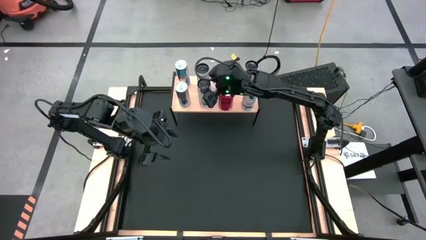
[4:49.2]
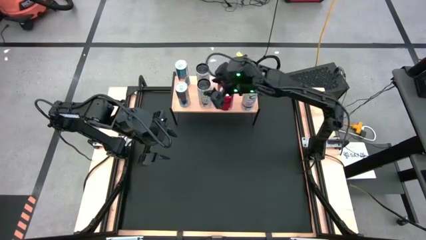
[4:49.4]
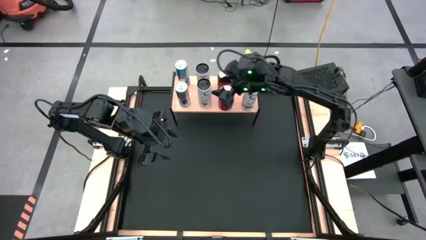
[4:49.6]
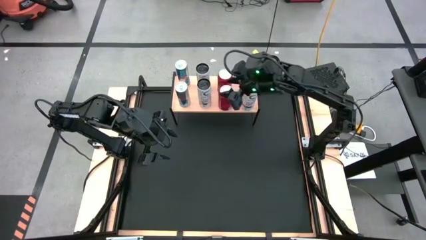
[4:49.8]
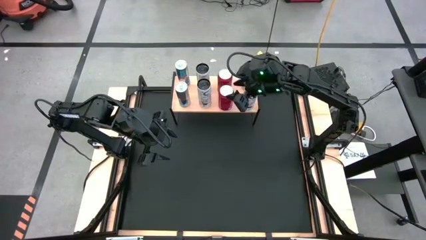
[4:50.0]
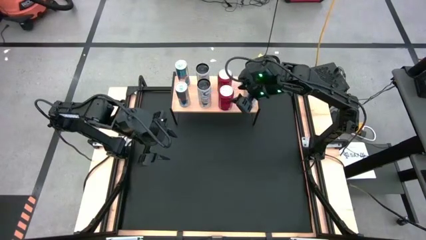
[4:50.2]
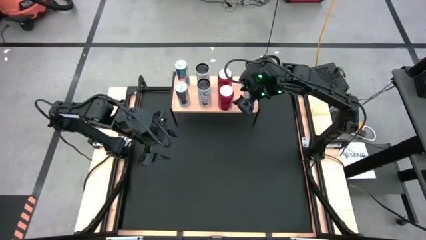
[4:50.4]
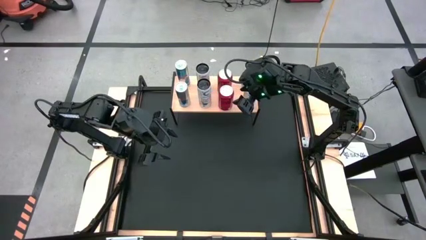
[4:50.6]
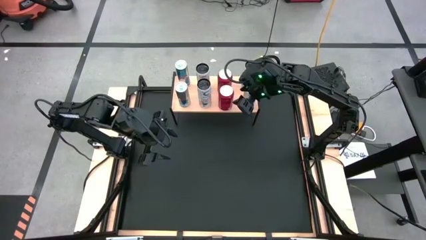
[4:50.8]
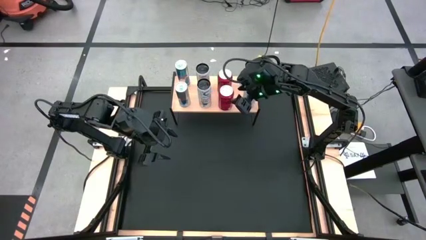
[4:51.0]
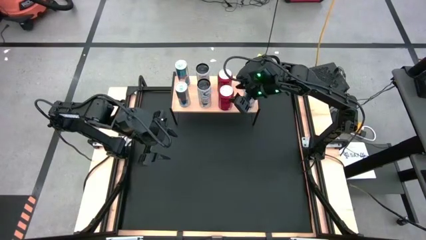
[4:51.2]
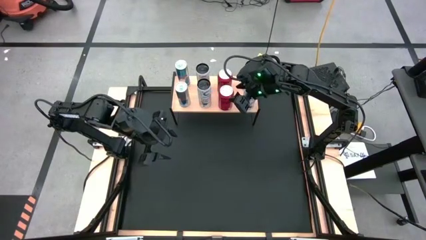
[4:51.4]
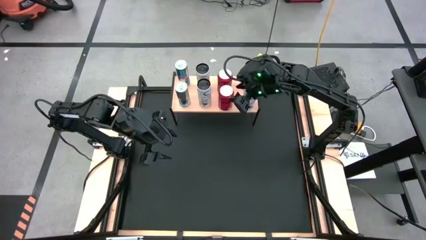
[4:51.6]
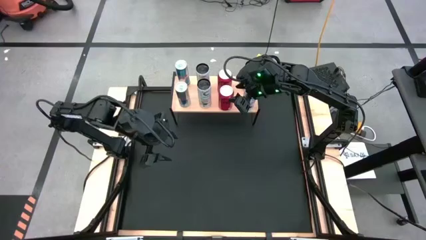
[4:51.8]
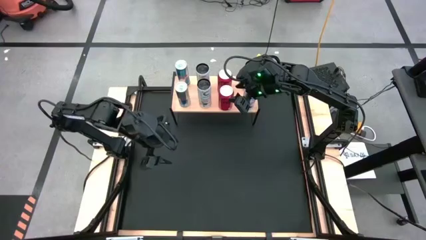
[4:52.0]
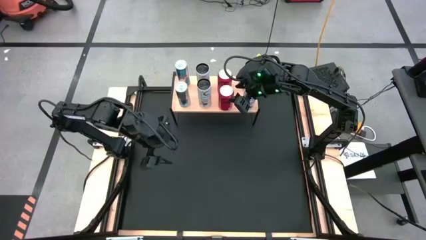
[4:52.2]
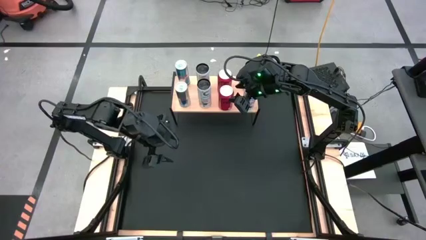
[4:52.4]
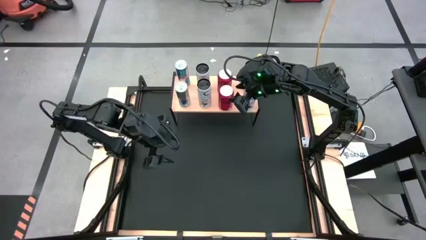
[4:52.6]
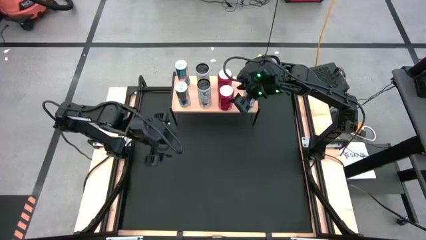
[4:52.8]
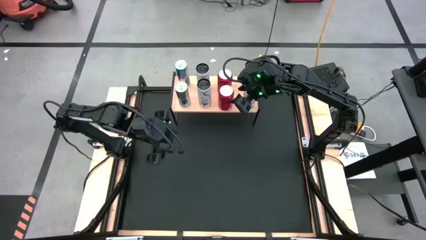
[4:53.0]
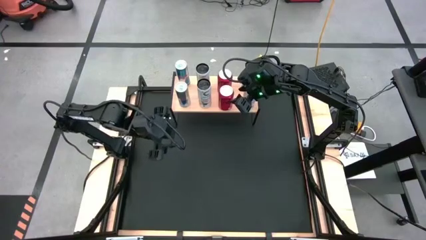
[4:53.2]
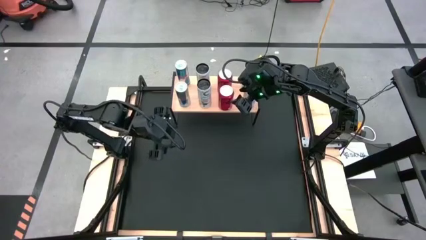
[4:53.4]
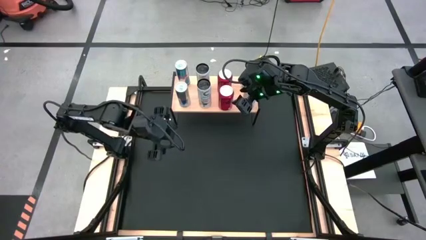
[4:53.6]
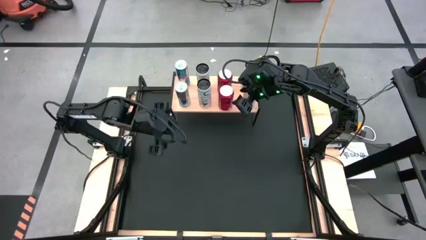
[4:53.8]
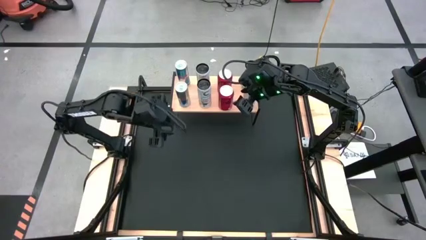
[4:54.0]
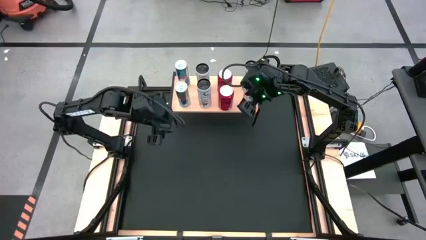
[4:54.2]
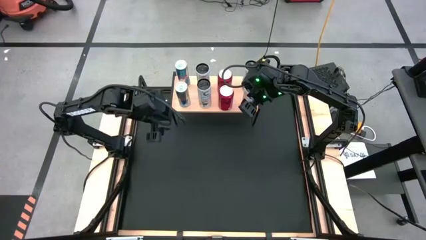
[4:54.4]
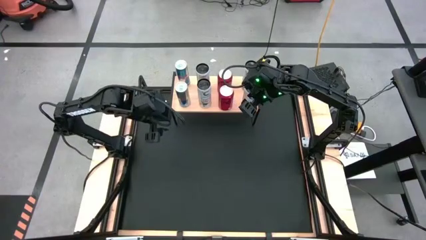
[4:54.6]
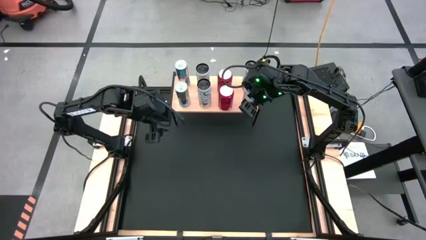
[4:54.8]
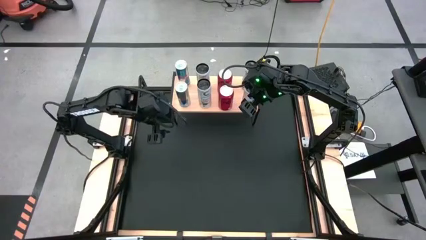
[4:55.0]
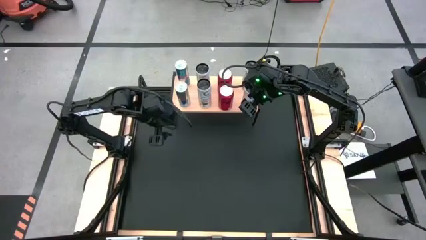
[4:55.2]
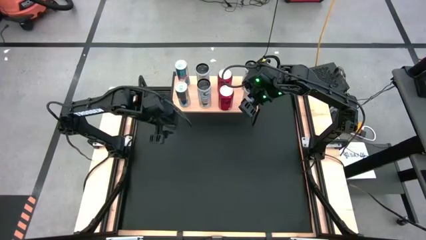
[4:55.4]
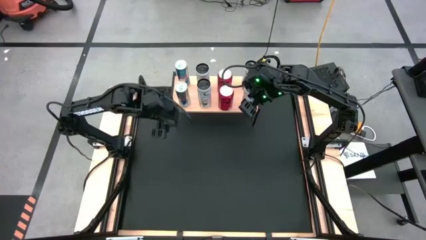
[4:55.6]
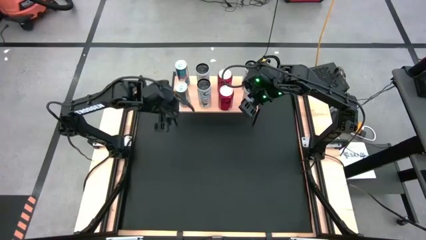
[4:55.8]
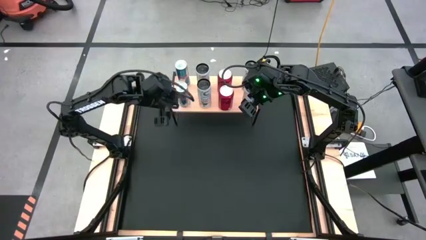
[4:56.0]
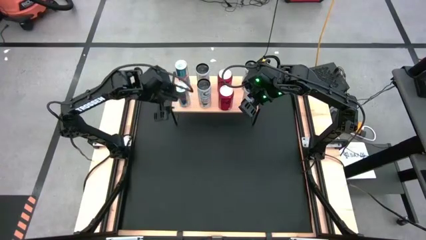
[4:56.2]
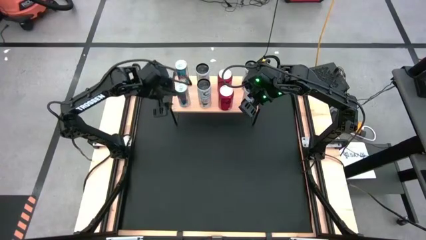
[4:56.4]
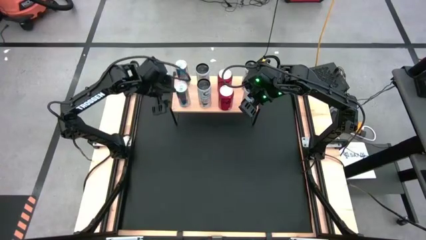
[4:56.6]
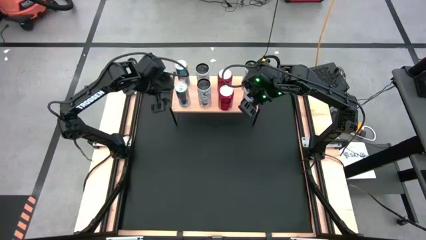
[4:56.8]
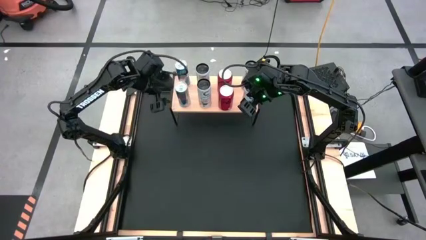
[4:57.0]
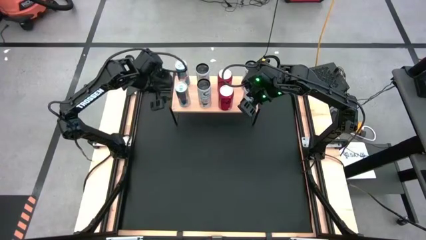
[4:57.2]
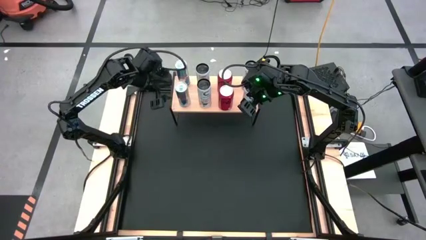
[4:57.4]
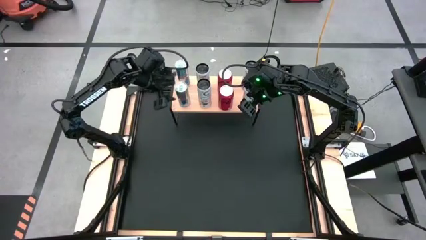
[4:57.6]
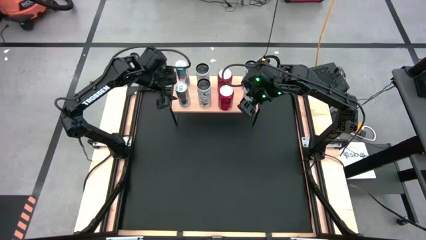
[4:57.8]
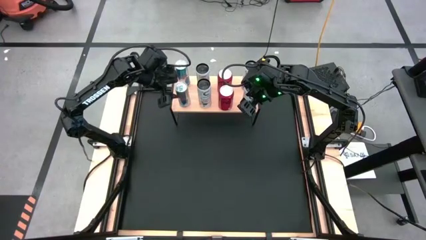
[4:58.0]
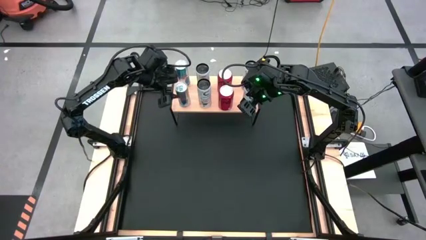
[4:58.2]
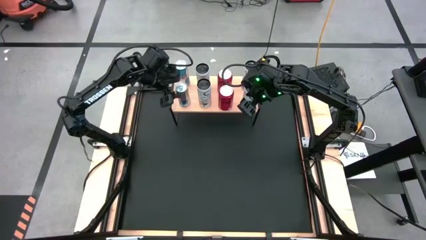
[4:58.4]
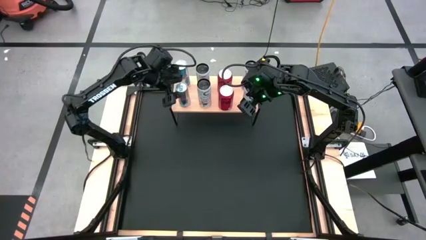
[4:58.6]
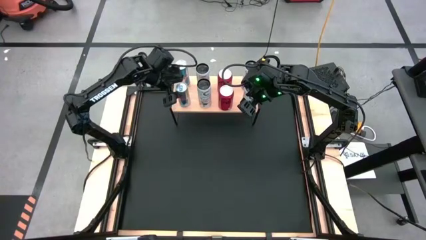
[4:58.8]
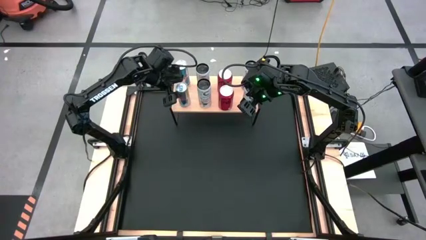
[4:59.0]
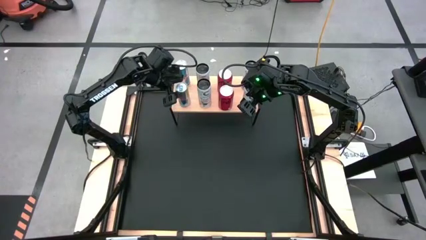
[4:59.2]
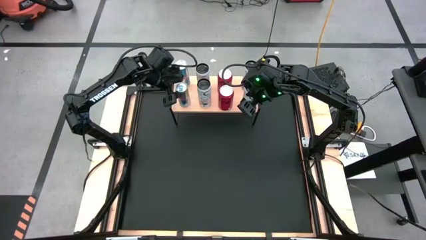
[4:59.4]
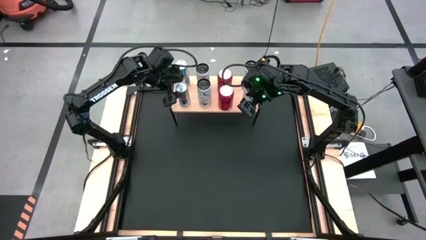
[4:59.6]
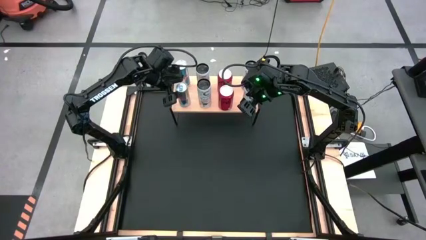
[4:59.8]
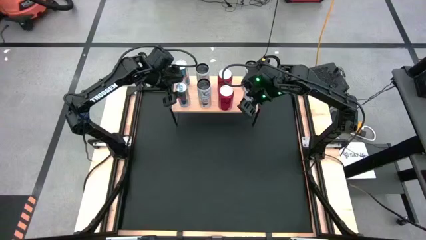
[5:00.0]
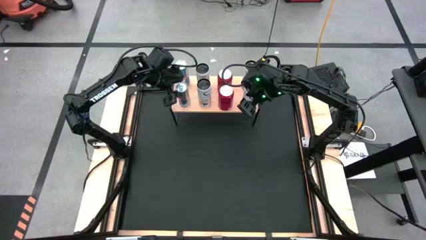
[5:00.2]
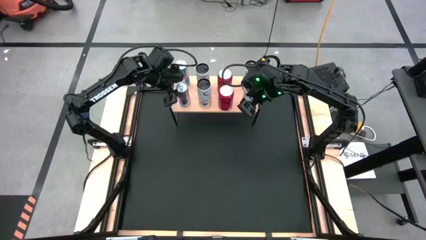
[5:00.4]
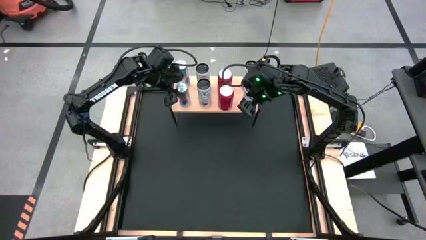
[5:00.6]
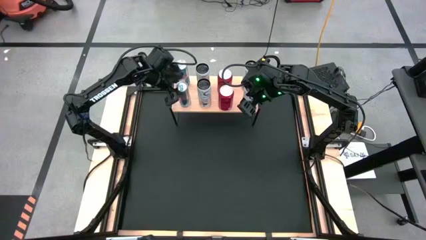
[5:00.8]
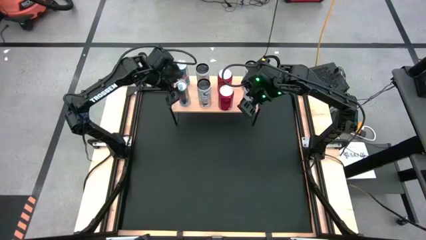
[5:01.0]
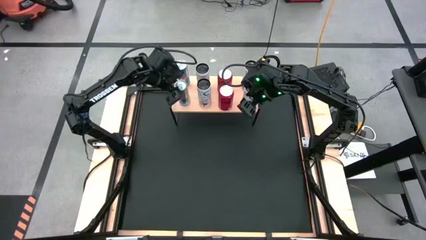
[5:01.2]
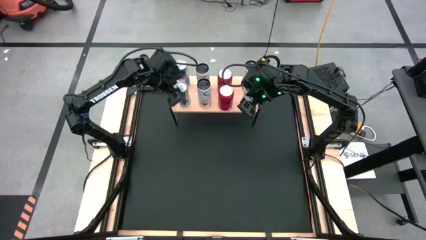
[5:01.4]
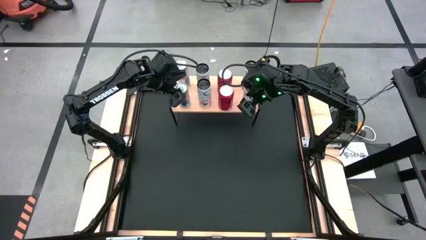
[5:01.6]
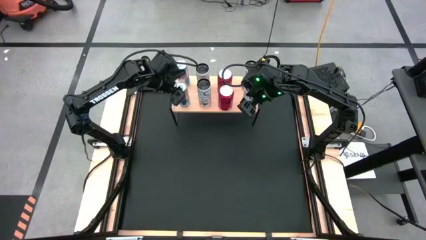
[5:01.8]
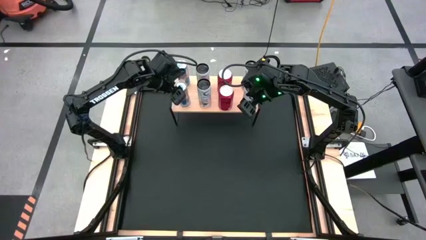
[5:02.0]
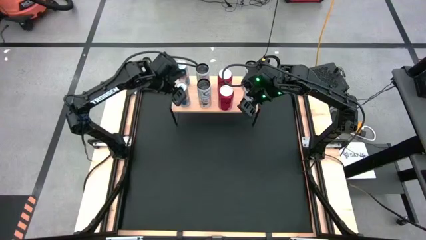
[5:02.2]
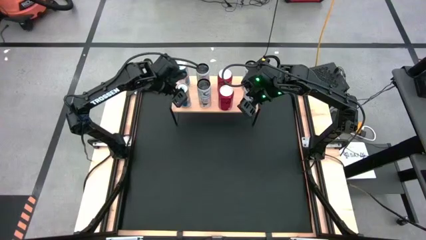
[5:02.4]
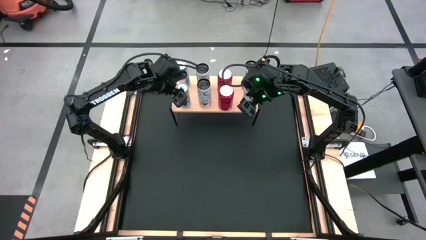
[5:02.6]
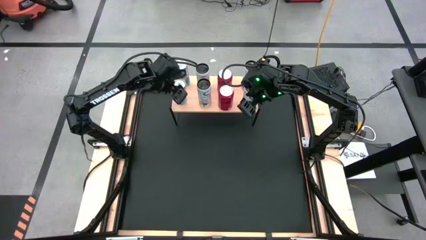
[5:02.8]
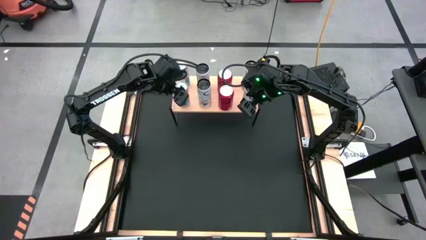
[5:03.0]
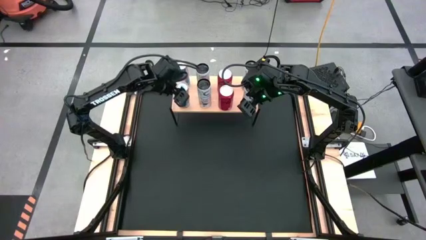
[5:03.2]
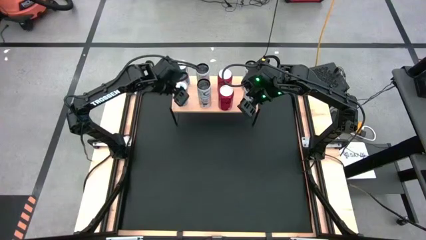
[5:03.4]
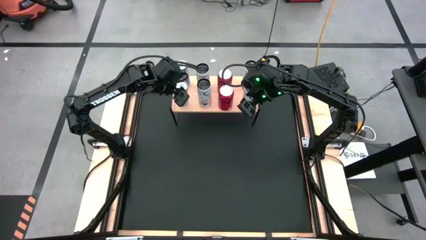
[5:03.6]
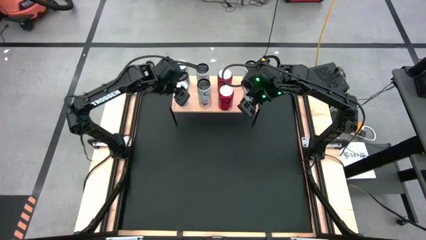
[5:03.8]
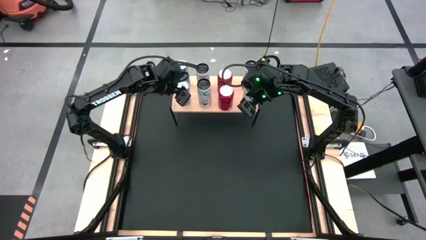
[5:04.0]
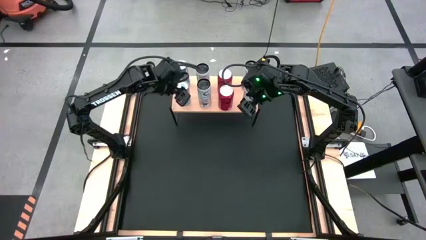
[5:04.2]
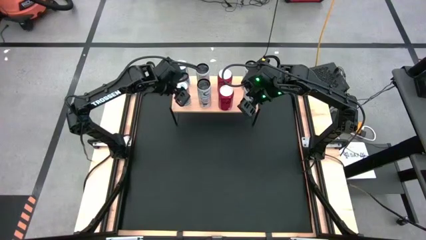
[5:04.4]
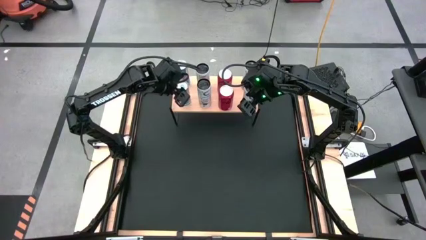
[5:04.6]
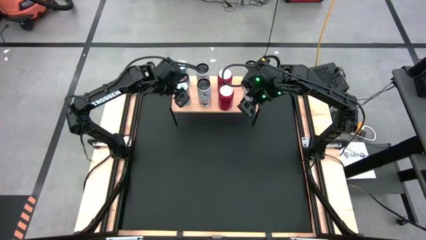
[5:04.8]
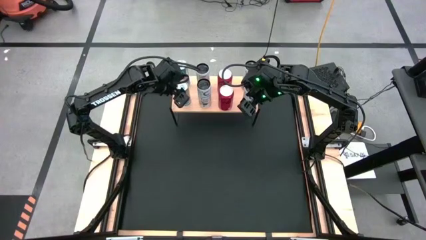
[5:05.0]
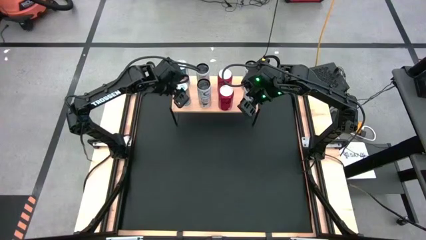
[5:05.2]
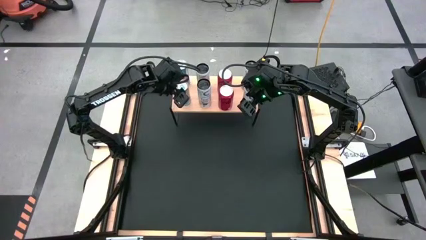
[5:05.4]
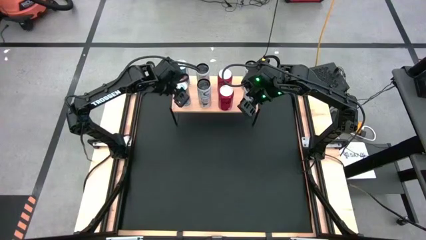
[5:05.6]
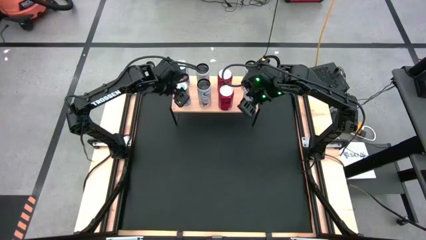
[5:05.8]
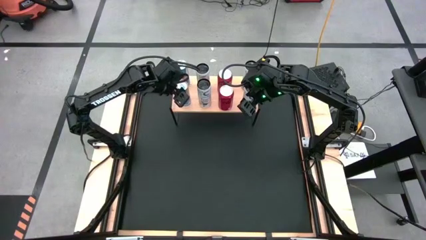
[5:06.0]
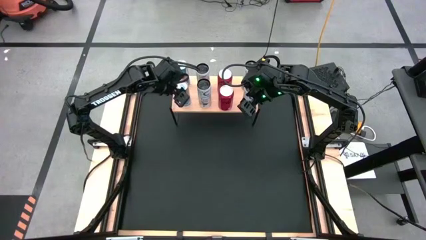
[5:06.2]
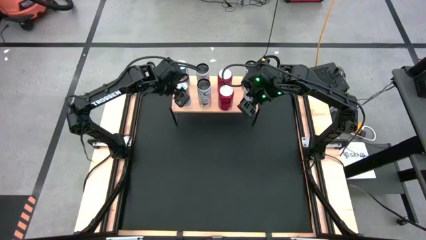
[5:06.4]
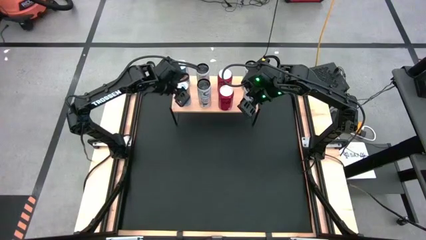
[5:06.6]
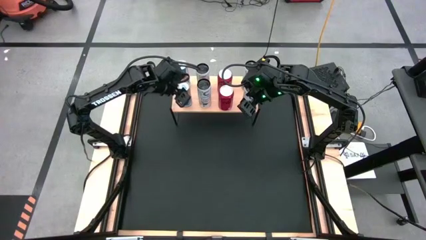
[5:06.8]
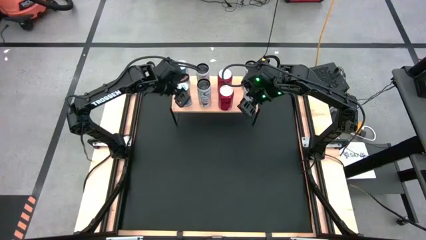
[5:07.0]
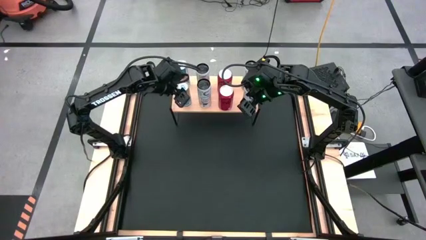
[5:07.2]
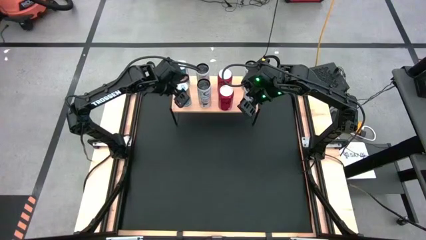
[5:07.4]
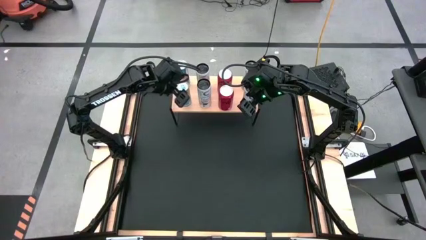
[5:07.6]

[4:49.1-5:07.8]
Task: Place canned beverage on shelf
Adjust the blue soda can on the shelf
